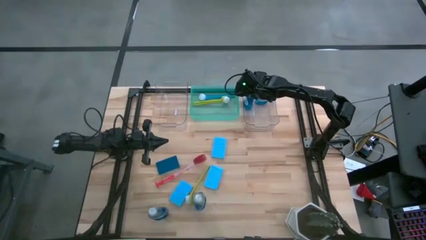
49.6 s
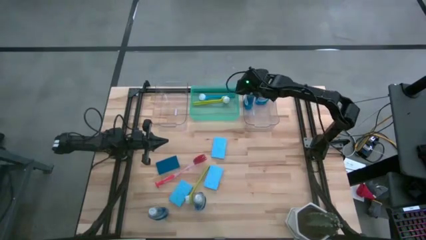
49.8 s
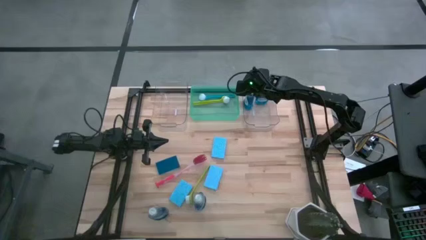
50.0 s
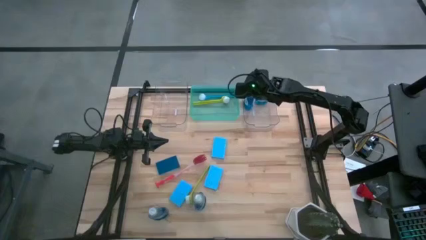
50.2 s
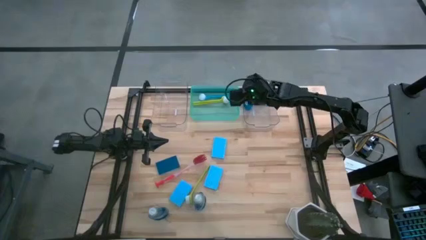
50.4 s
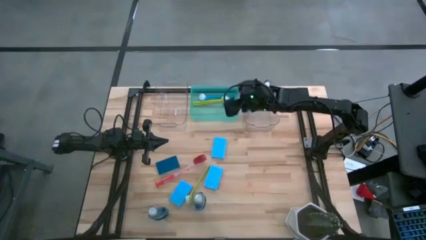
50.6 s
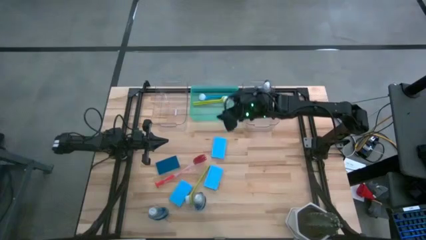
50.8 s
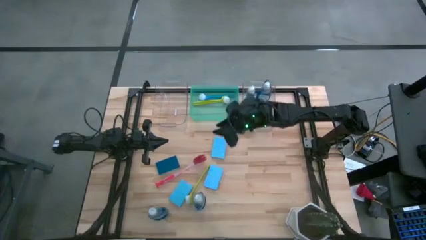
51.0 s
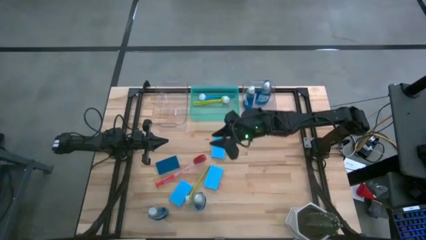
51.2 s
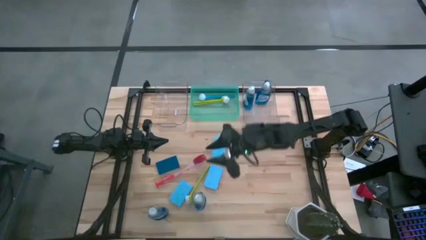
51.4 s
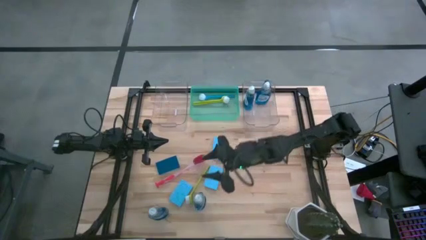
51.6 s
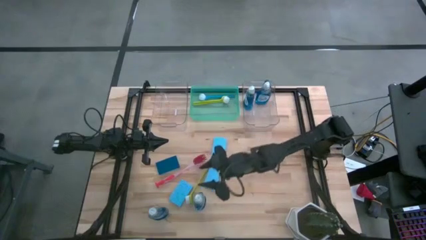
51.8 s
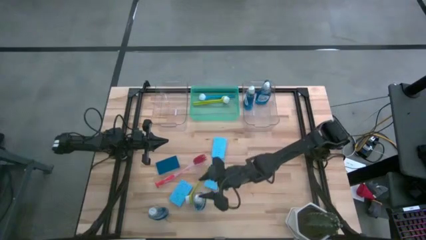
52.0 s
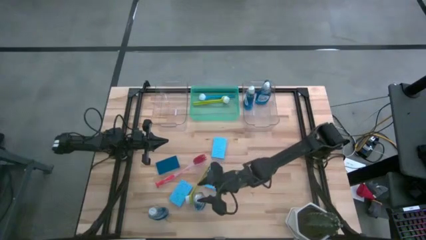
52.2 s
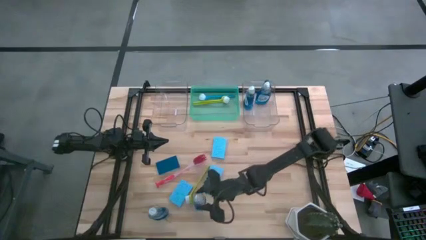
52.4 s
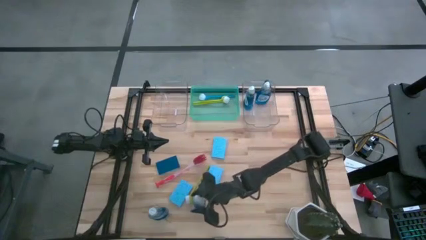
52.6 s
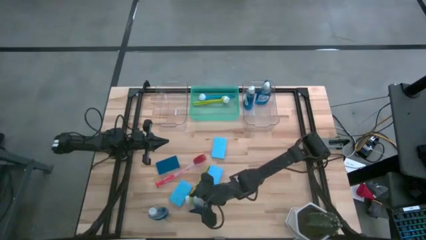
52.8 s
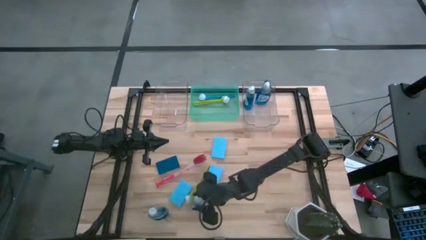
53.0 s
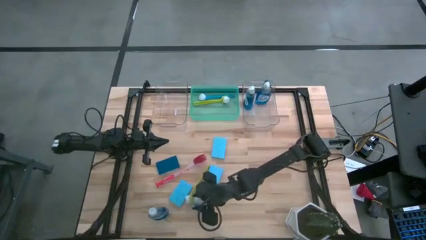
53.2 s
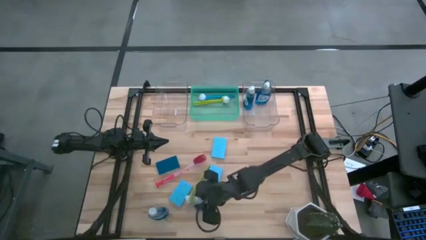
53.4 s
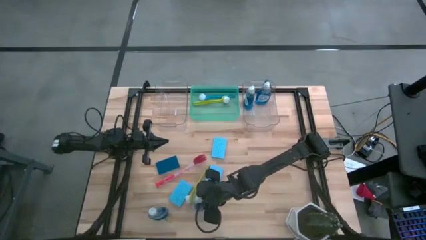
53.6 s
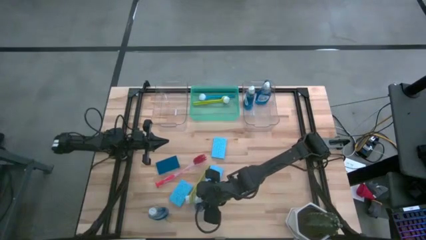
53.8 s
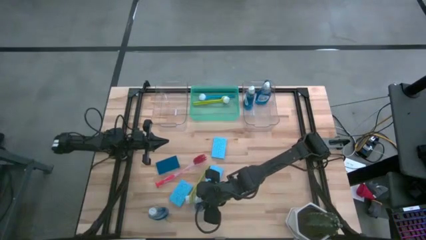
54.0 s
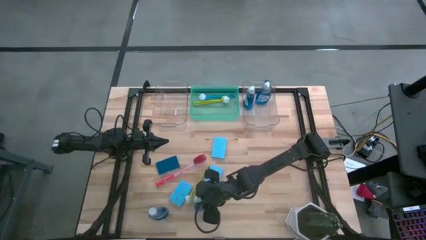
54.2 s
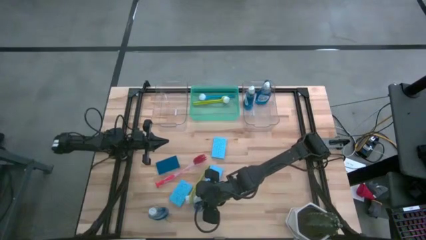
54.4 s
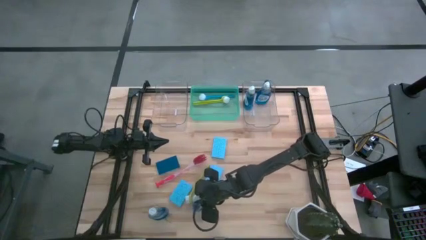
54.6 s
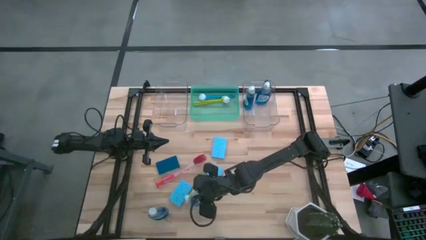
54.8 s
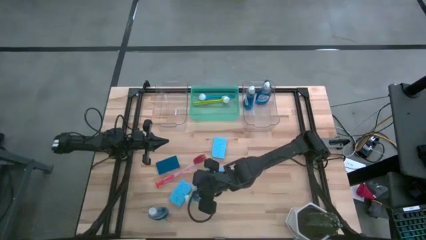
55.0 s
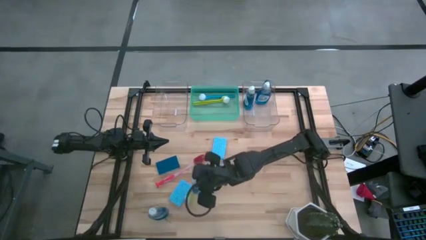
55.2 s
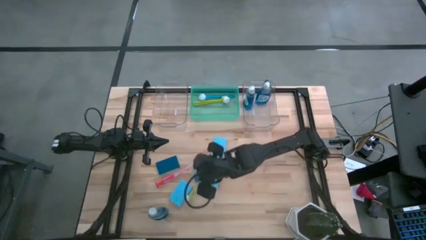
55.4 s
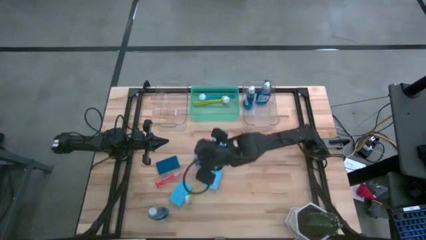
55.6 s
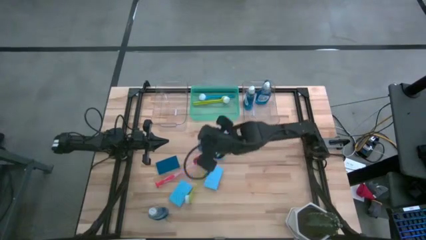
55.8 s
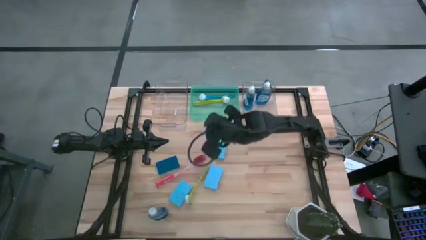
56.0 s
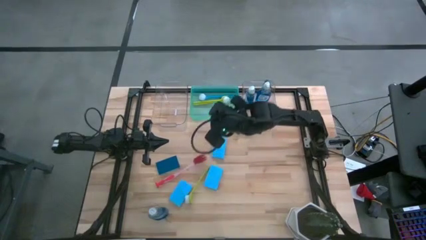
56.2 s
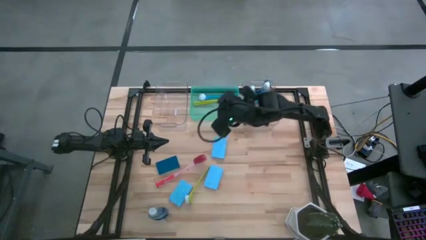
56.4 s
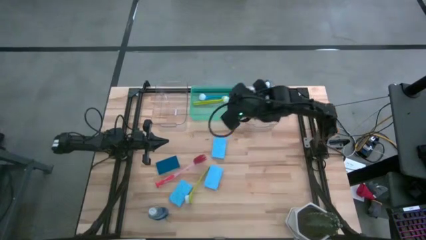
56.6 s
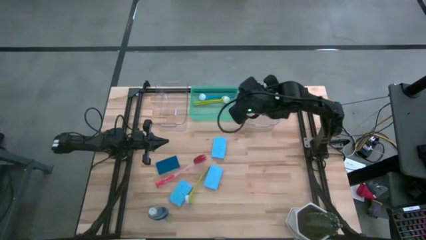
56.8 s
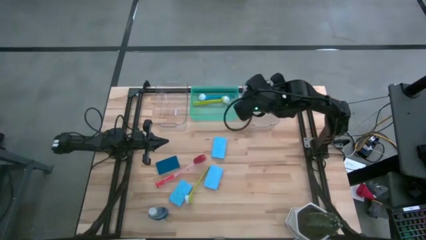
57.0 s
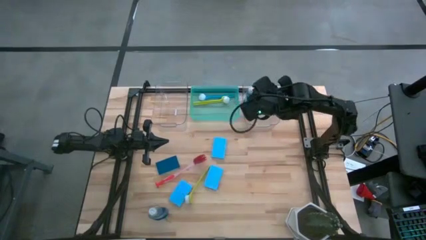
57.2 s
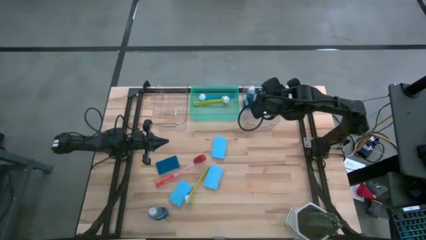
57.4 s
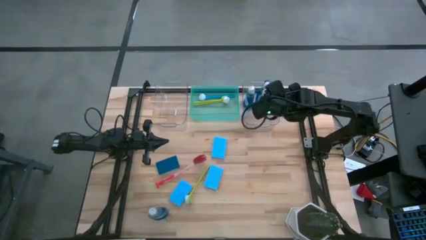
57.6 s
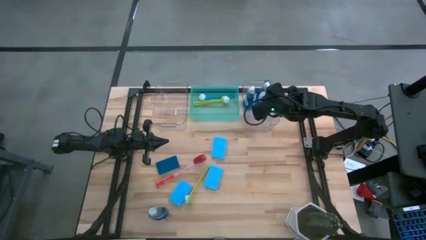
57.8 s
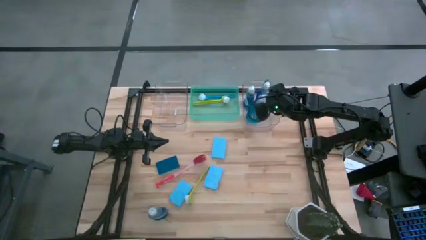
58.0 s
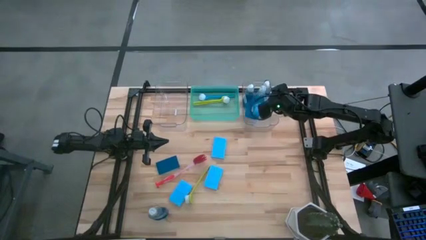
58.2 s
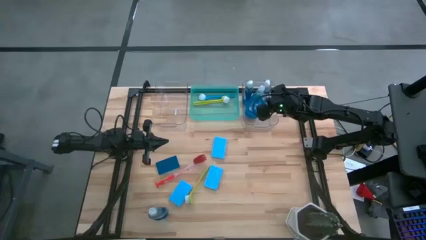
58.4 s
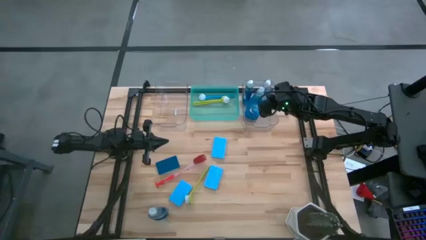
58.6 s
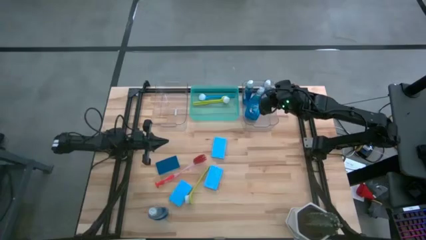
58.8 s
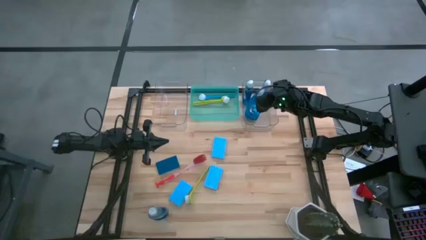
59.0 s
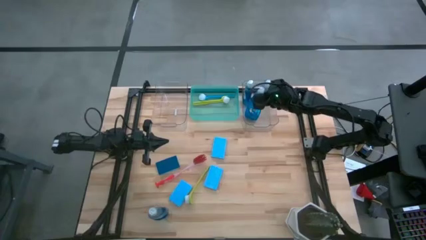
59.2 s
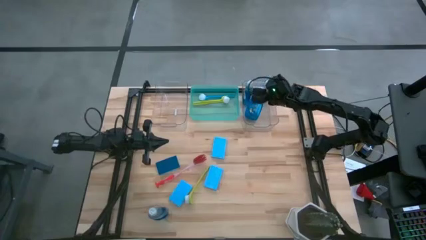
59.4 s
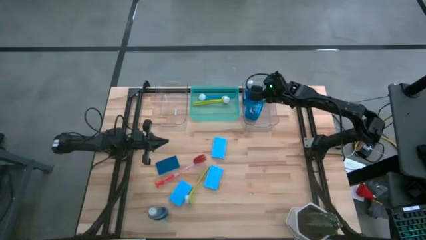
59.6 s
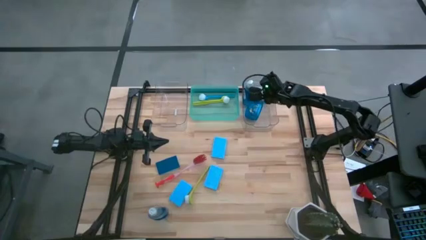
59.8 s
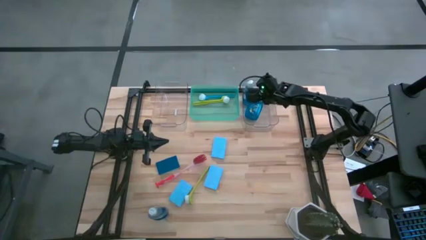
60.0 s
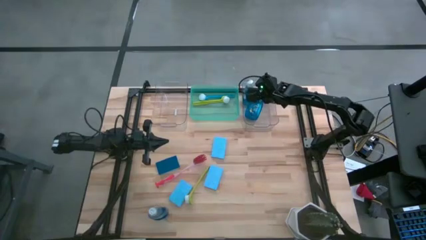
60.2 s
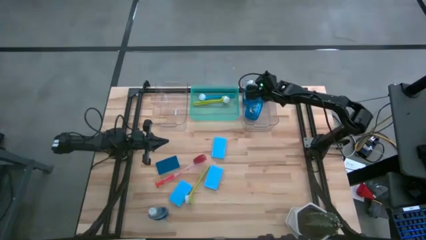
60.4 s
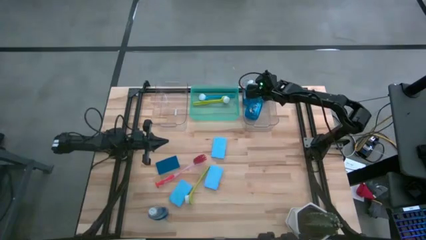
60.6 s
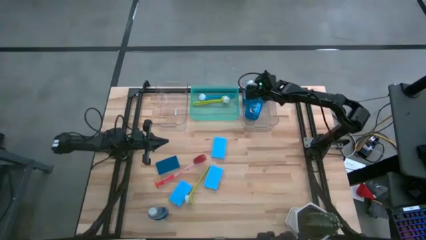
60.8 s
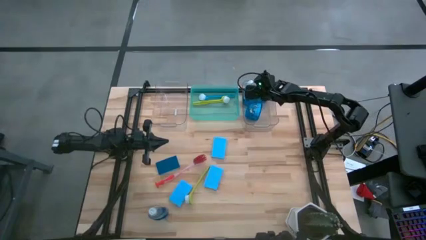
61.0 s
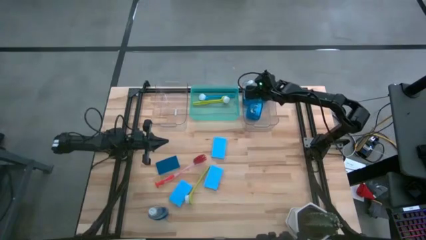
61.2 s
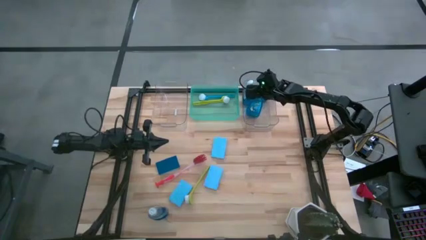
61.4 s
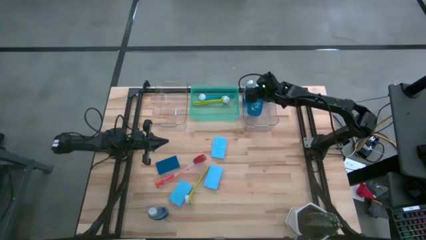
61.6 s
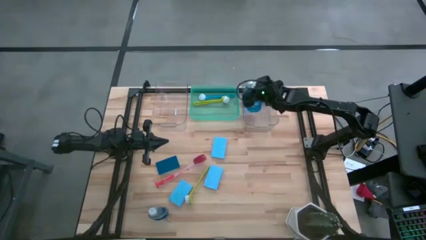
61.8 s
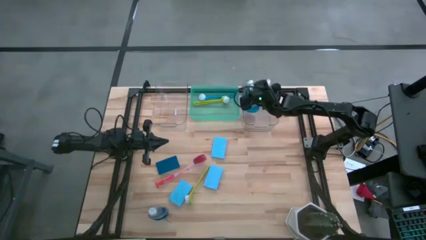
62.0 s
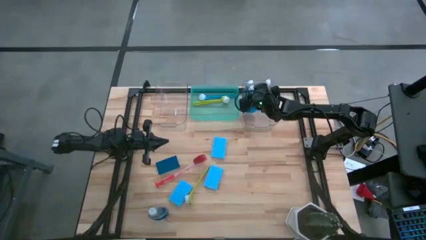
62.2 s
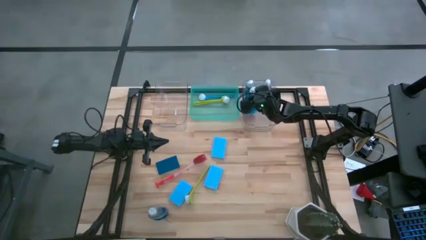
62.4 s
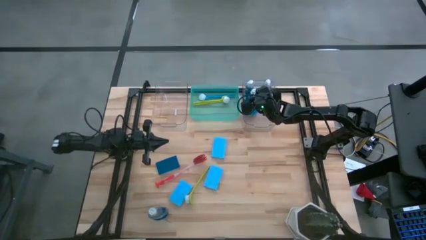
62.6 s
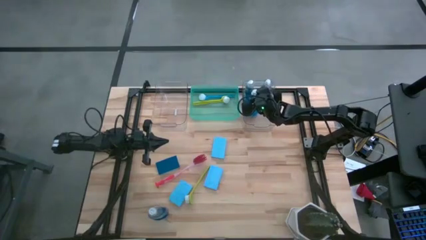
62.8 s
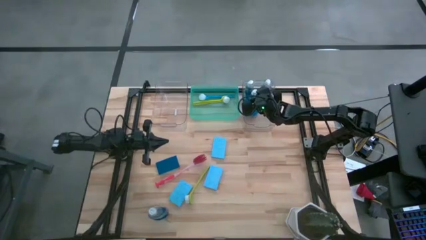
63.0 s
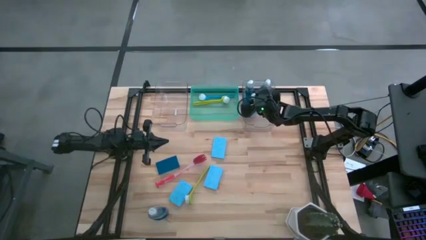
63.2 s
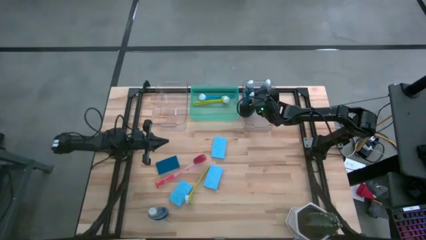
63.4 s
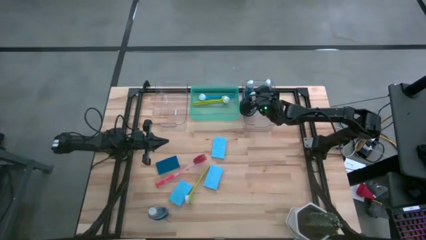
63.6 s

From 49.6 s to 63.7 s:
Task: Pick & Place Kitchen Sink Supplies
Put the blue dishwashing liquid bottle into the right transparent bin

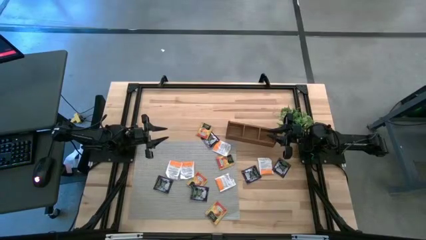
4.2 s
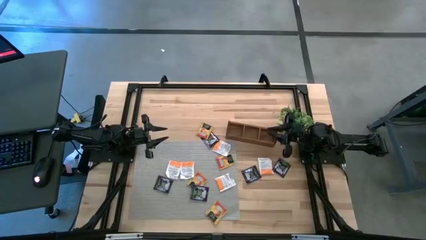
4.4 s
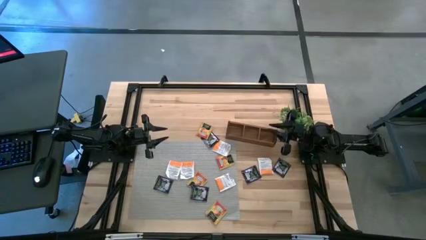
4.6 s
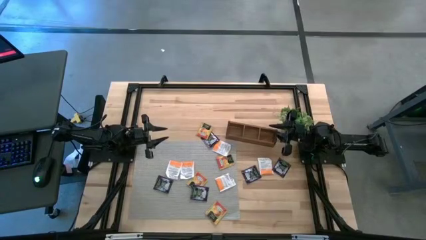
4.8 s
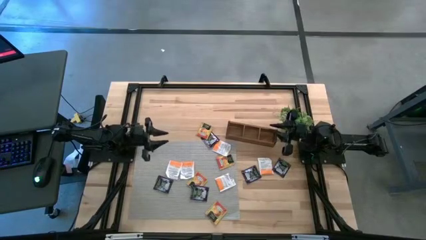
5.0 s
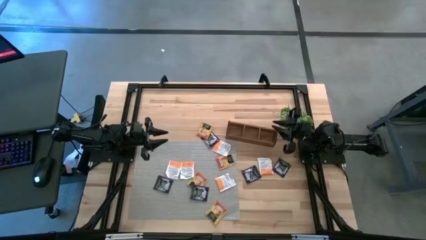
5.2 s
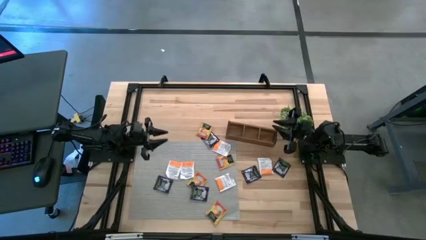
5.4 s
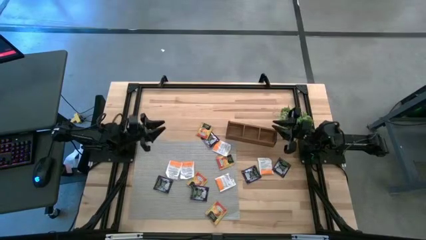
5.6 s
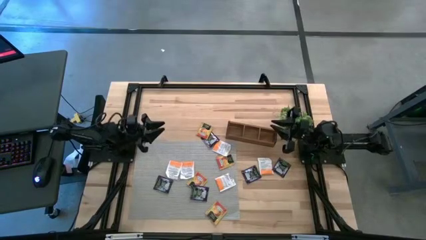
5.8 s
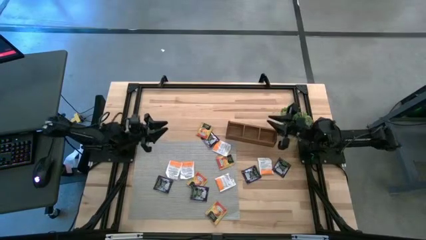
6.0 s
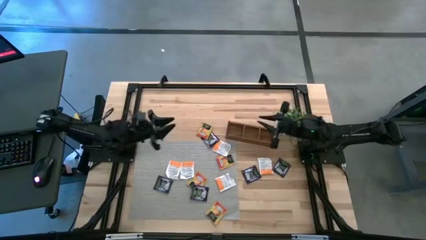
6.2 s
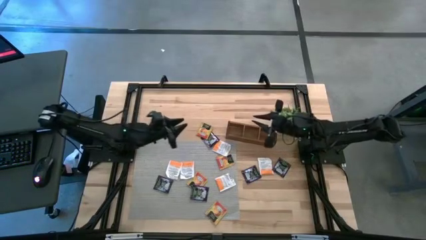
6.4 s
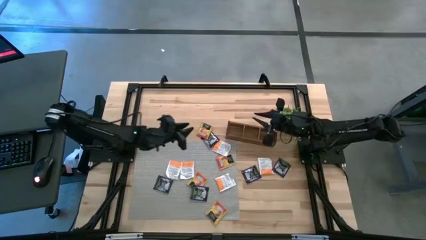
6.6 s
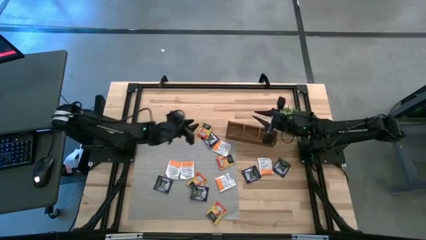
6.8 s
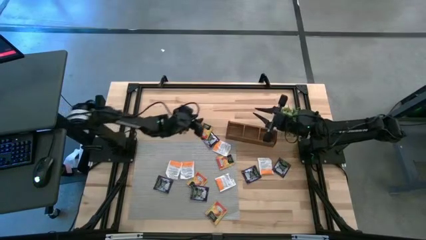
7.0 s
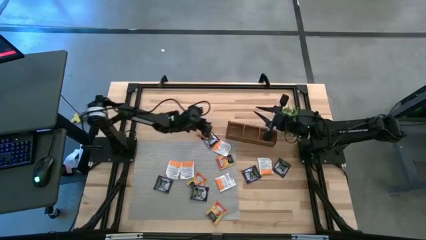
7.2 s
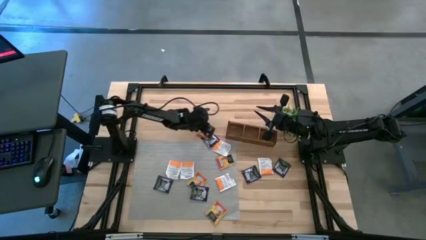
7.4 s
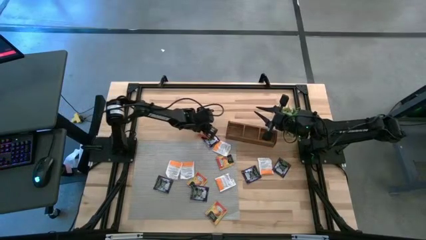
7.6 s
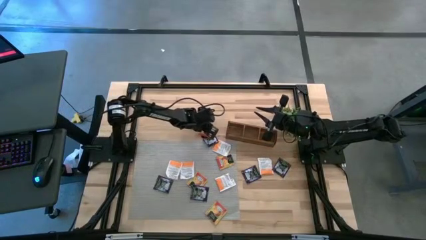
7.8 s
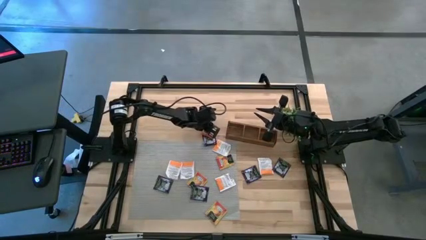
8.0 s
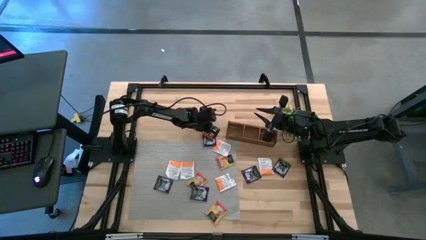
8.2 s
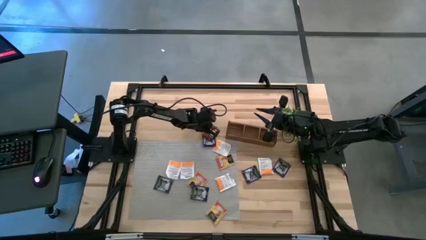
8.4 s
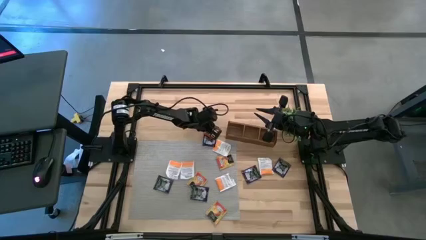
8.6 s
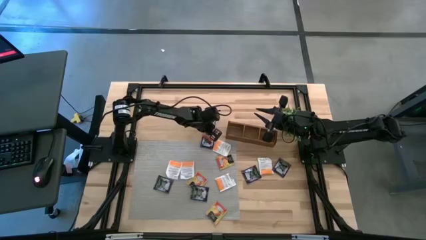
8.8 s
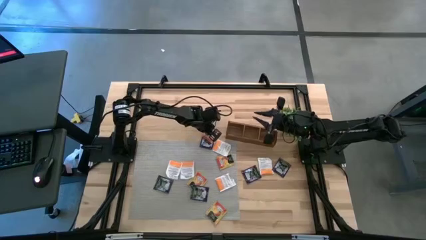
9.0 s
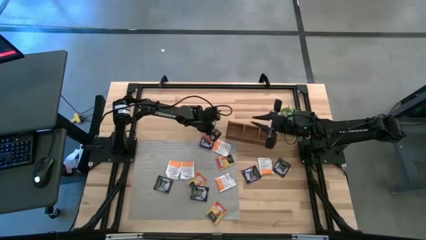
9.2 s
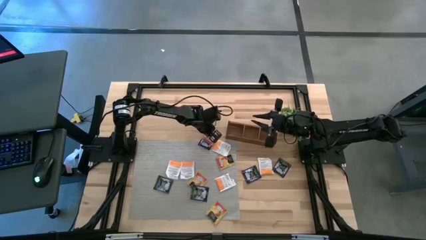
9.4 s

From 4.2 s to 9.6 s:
Task: Pick & Place Tea
Put the yellow tea bag in the left section of the wooden organizer
